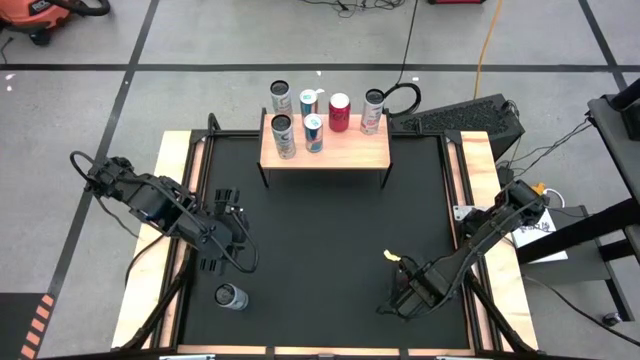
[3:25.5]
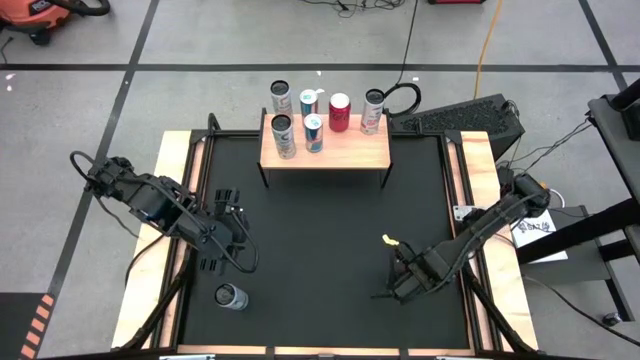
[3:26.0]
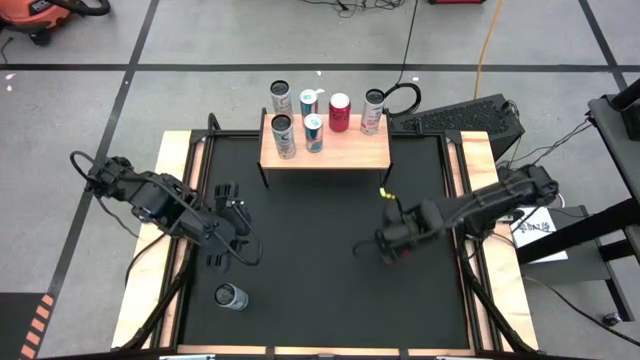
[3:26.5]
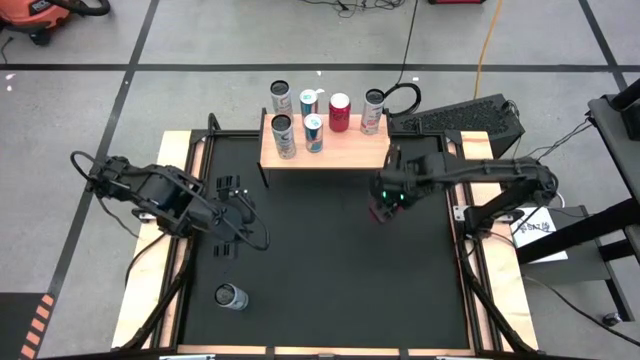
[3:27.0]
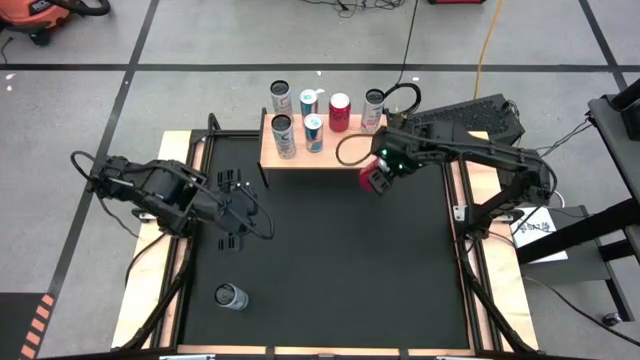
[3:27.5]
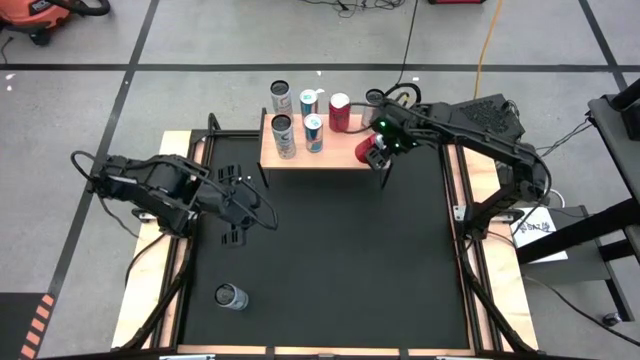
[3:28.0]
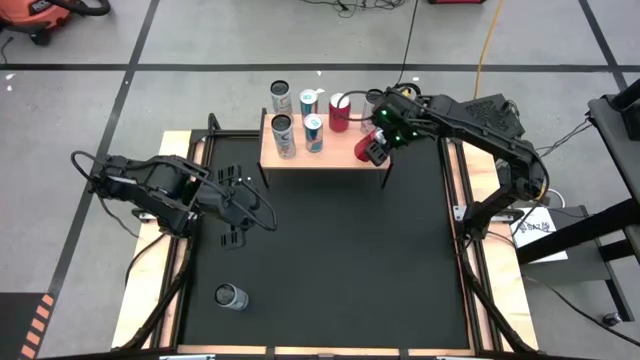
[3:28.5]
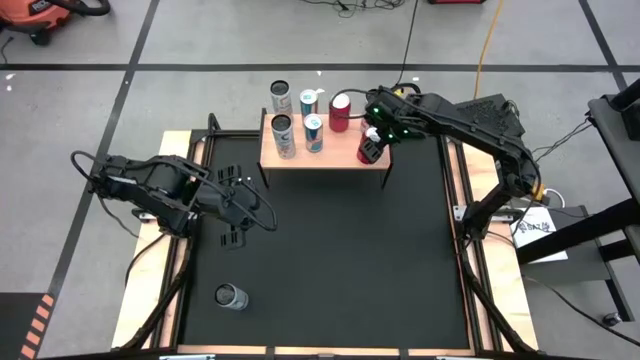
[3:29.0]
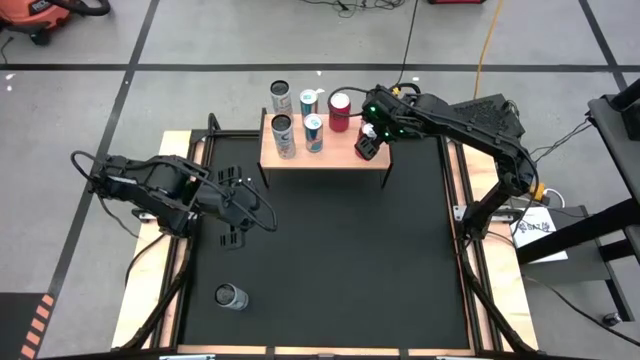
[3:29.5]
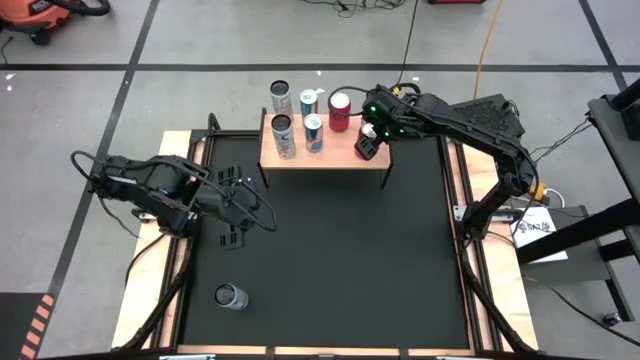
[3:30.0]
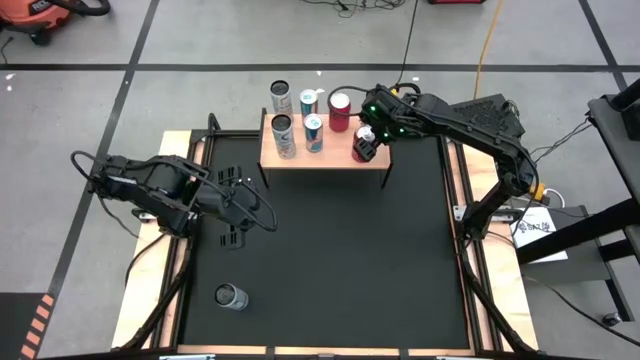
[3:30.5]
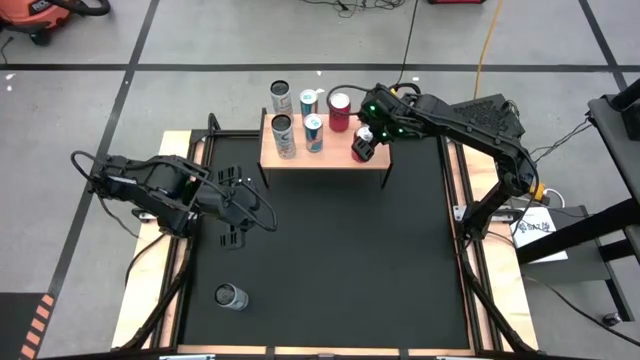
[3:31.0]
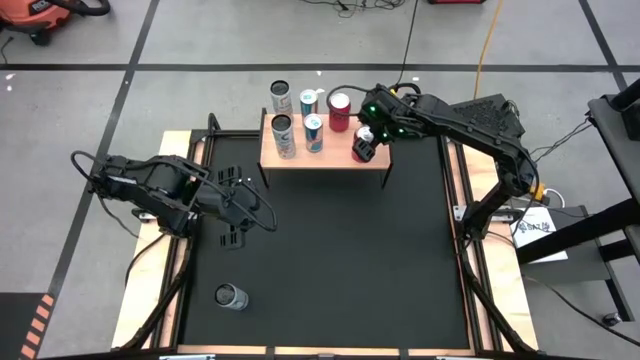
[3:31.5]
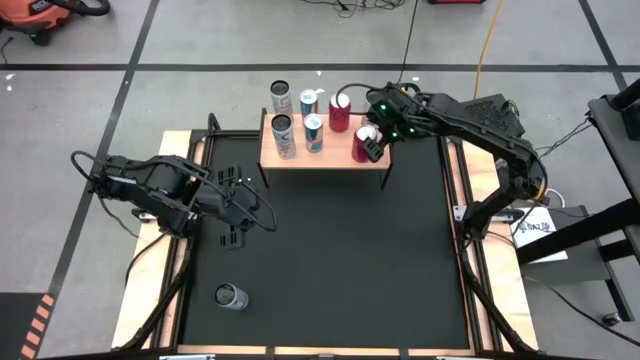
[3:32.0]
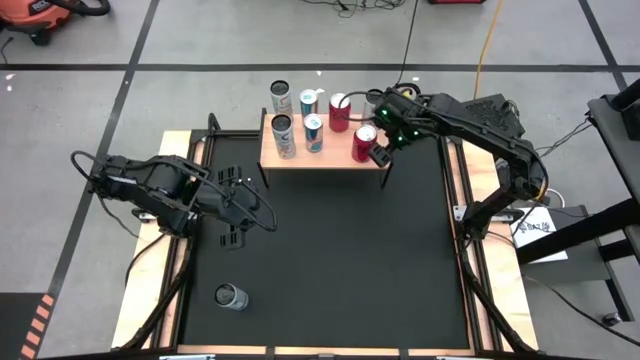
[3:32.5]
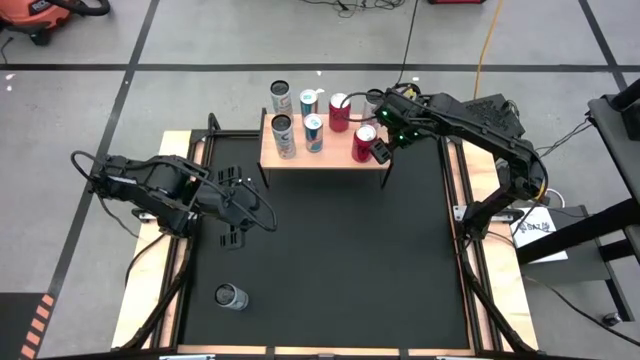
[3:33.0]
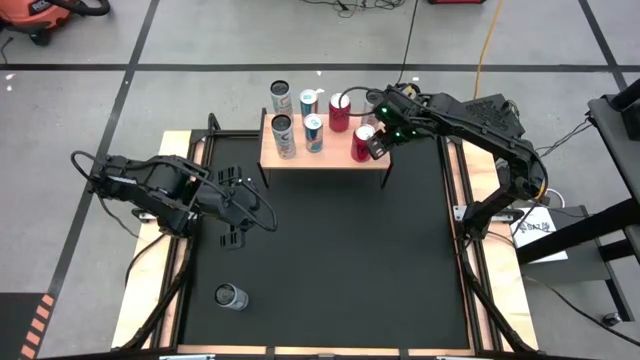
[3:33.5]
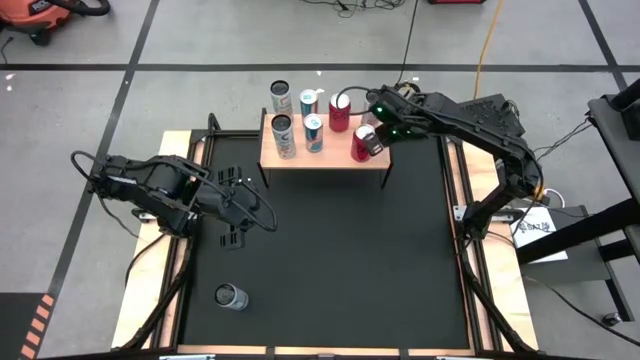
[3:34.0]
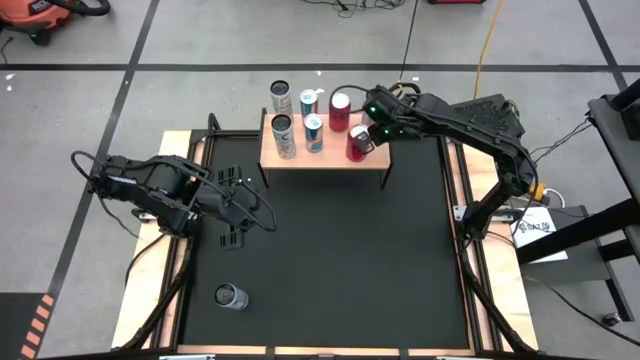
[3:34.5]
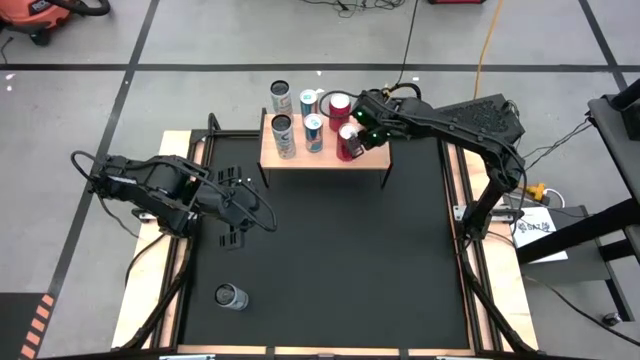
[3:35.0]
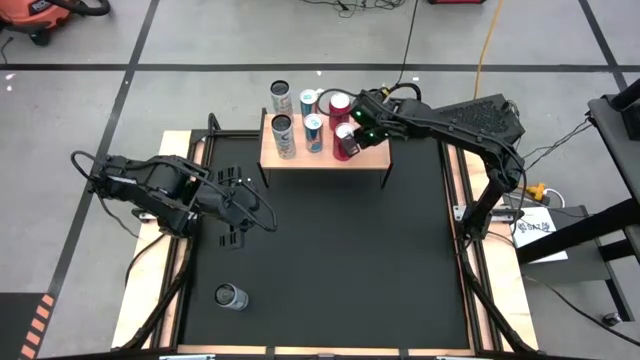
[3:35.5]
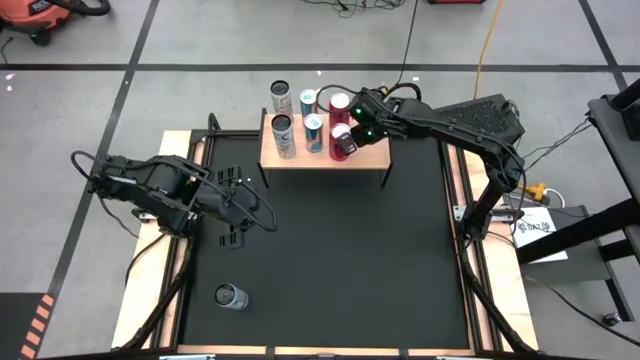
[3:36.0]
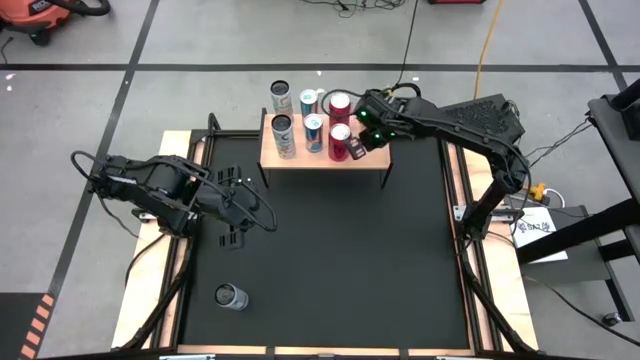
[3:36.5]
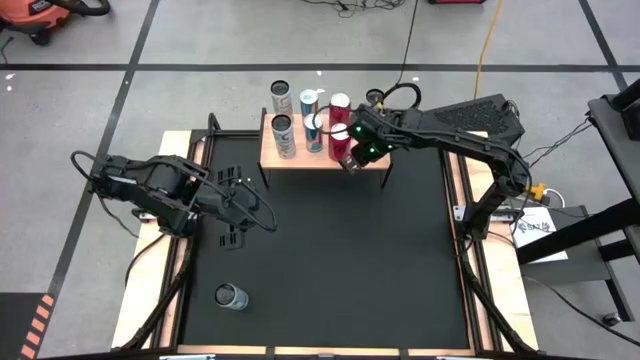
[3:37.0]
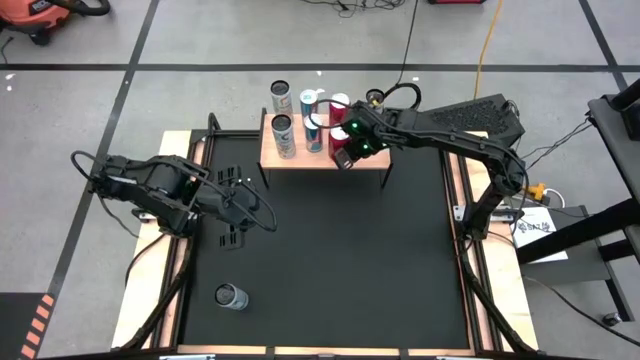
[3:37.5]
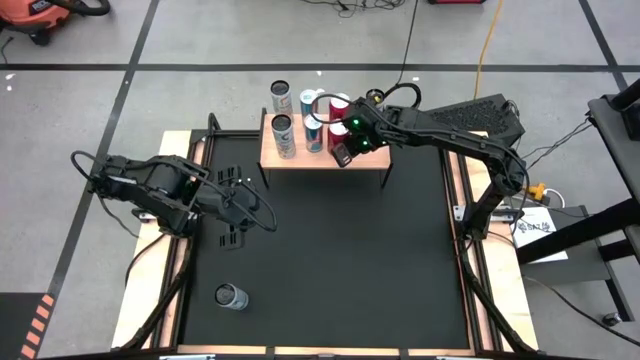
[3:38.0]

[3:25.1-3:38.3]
Task: Place canned beverage on shelf
Put the red-black soda can on the shelf

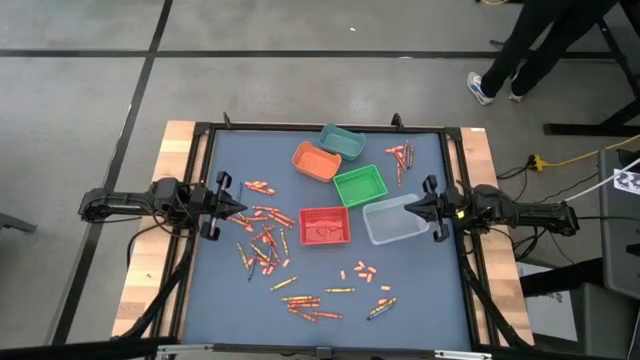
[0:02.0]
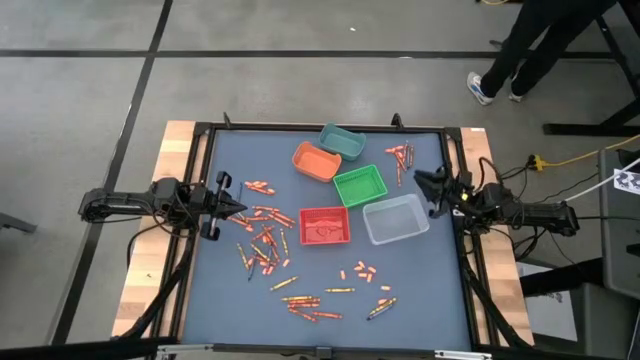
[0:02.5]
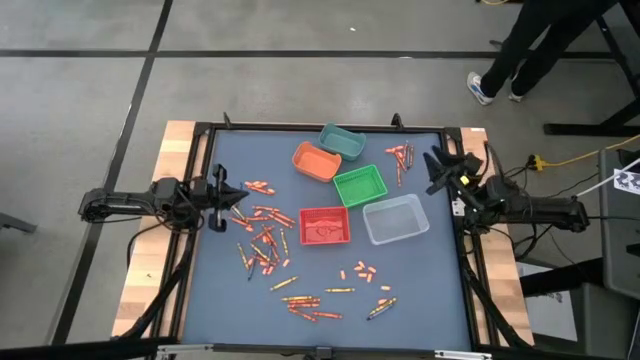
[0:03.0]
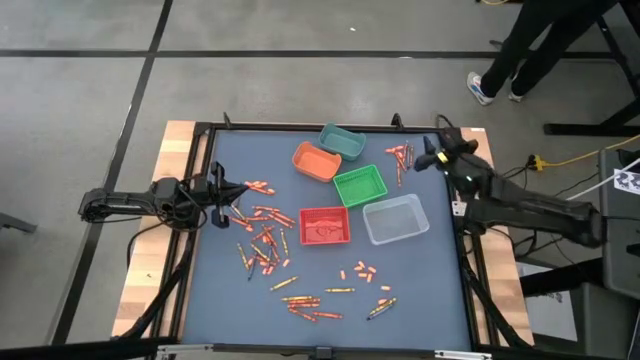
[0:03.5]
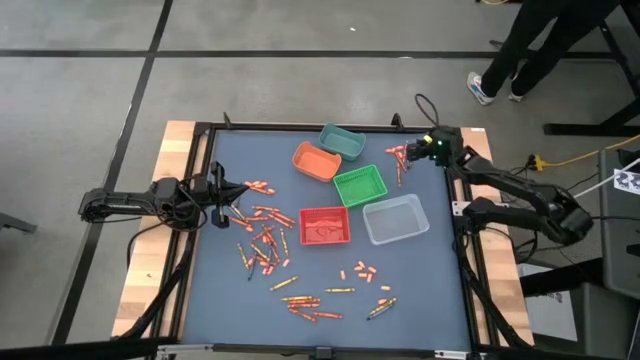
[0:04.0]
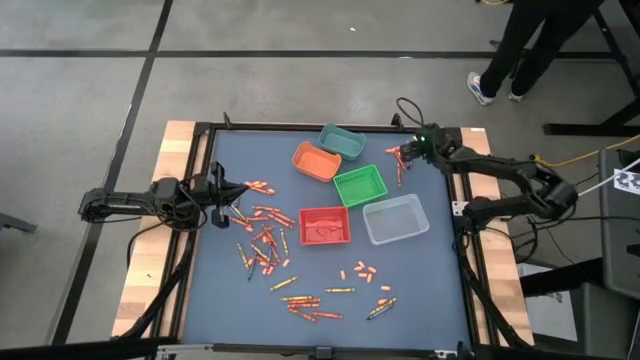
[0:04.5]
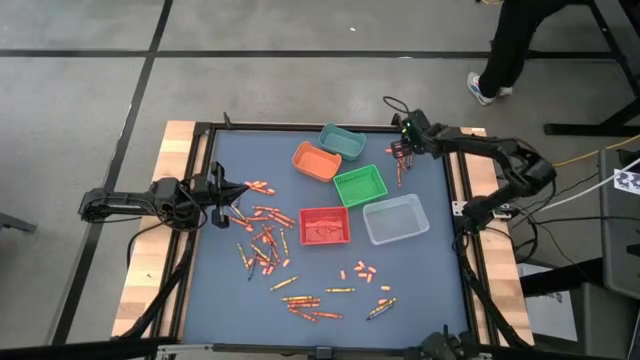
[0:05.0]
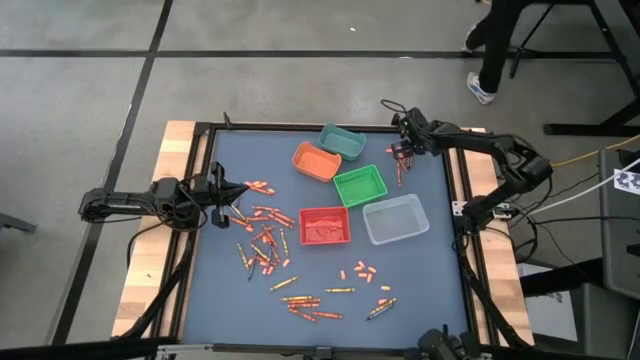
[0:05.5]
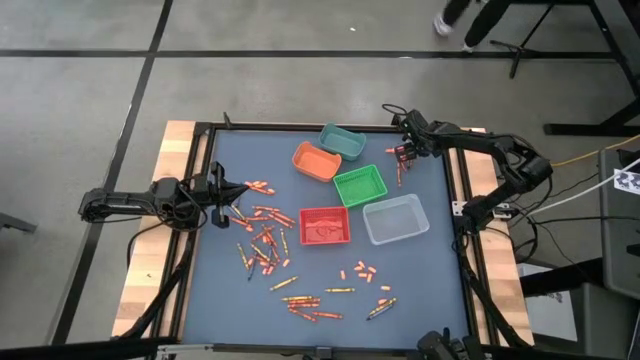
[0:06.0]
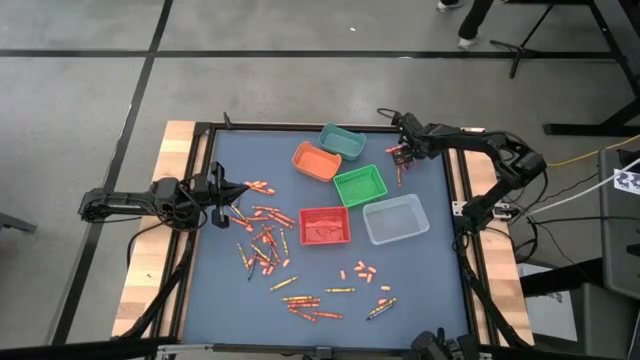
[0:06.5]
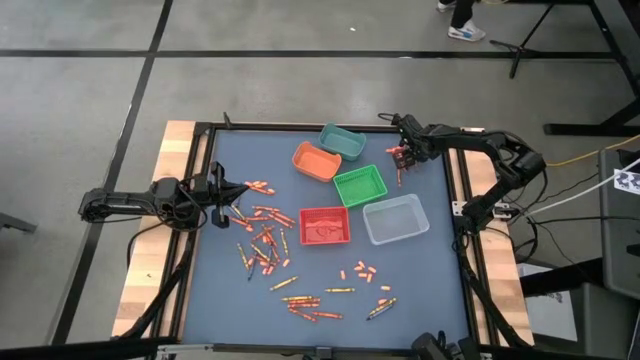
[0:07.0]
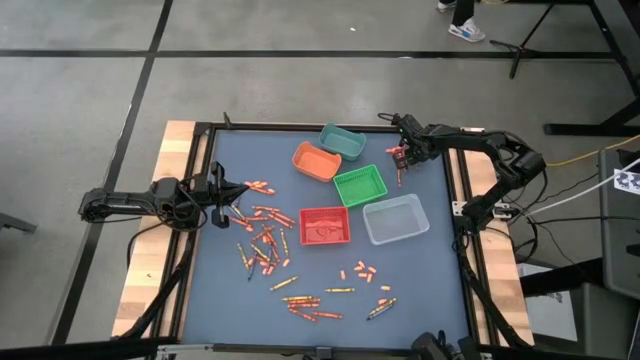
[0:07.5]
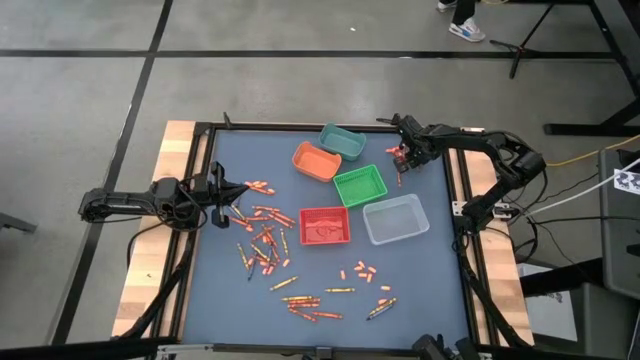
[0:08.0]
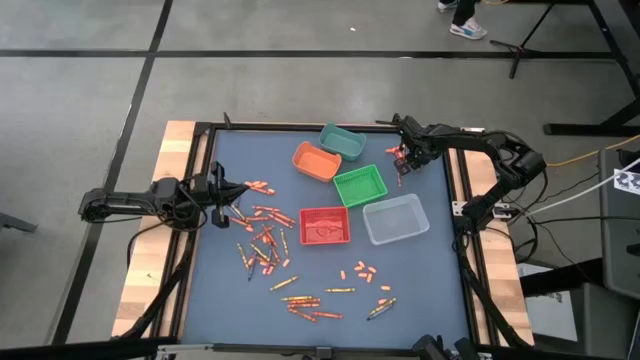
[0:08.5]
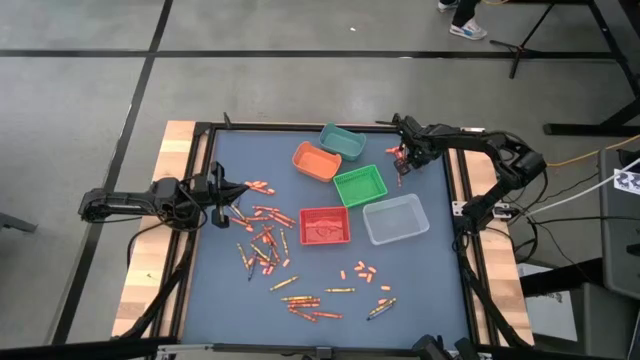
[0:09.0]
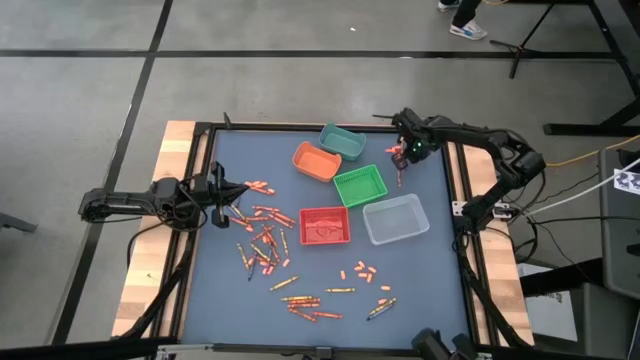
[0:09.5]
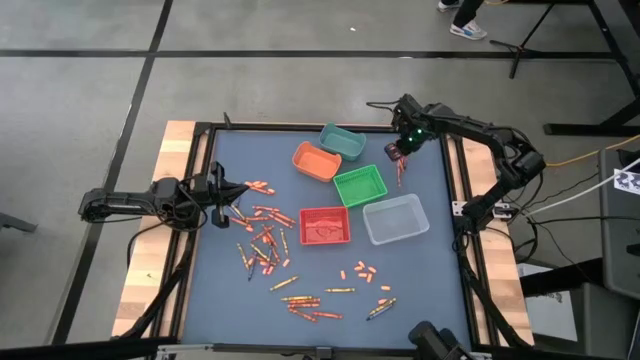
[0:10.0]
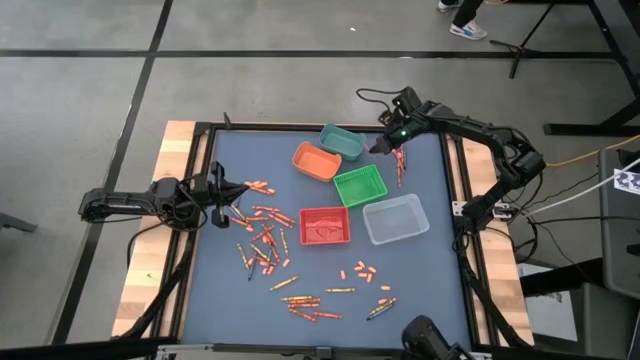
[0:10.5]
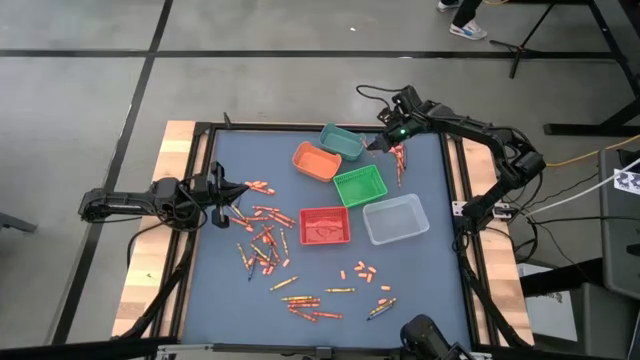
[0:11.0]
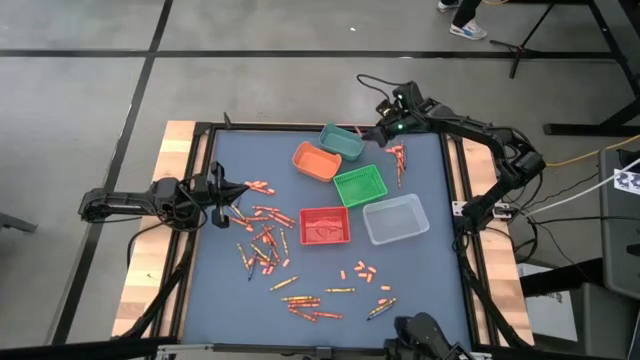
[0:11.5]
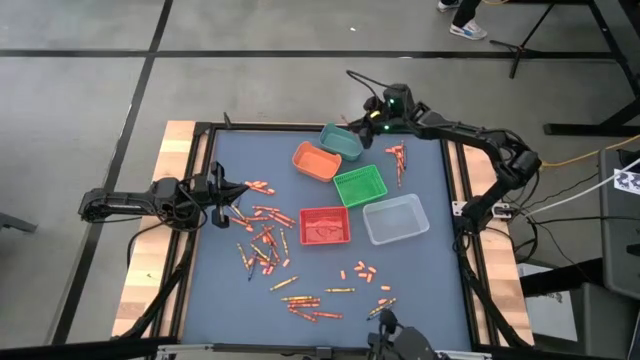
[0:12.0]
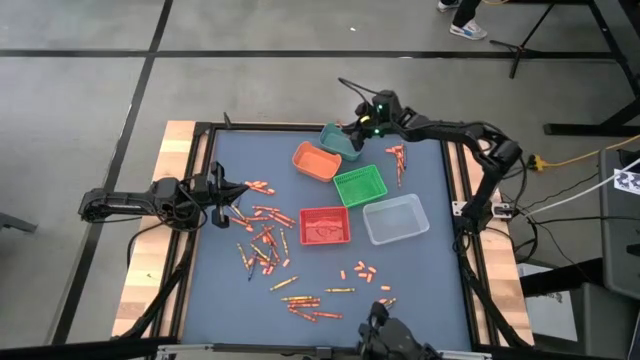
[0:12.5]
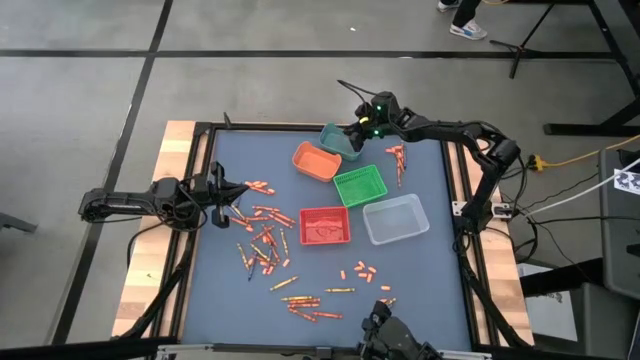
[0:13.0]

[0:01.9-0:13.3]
Task: Sort crayons
Put the red orange crayon into the blue bin
